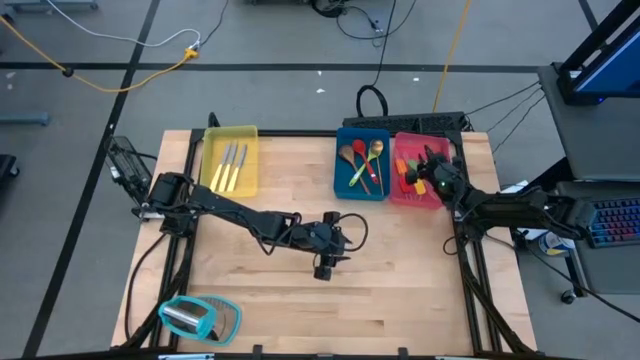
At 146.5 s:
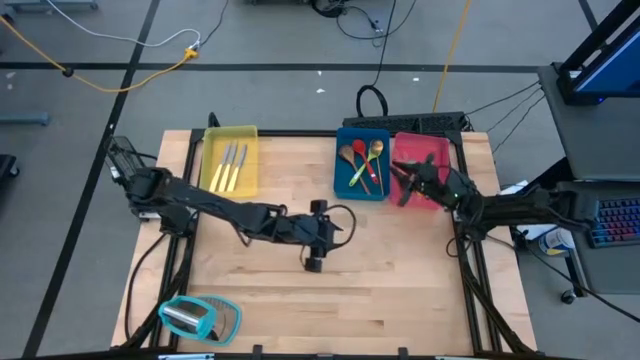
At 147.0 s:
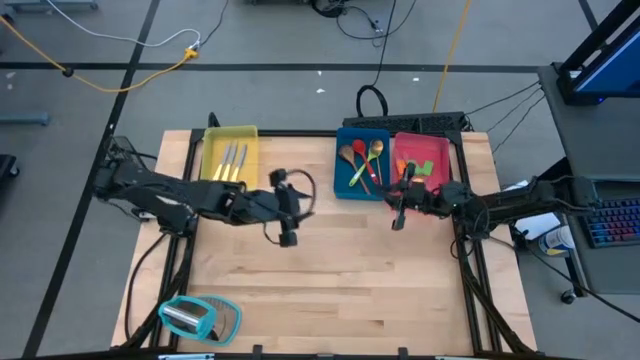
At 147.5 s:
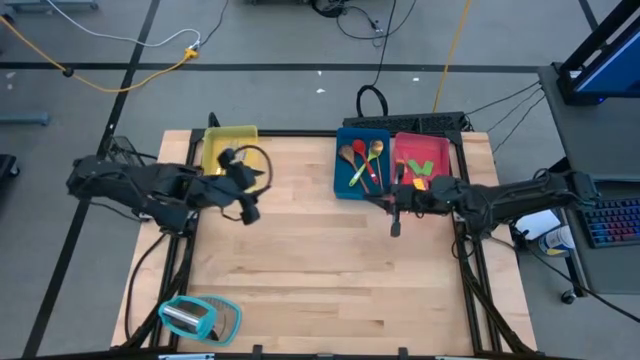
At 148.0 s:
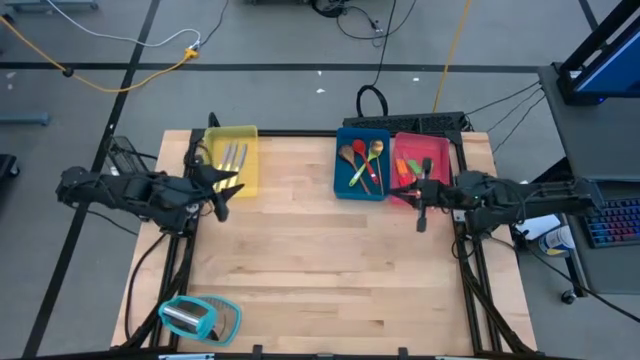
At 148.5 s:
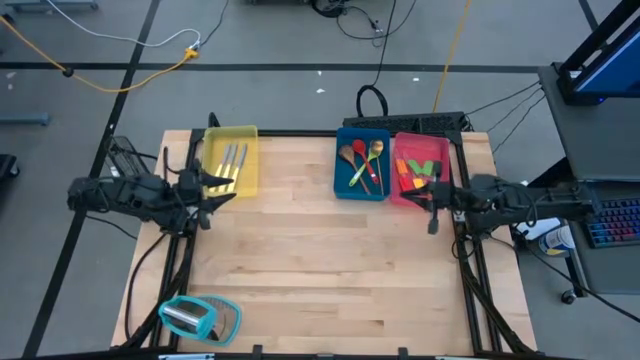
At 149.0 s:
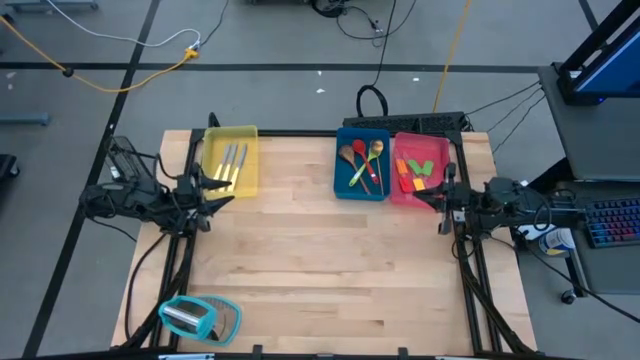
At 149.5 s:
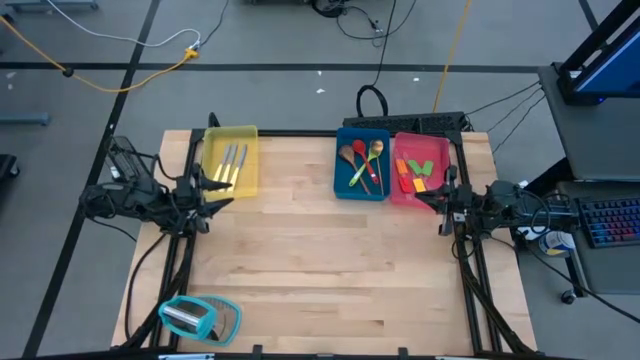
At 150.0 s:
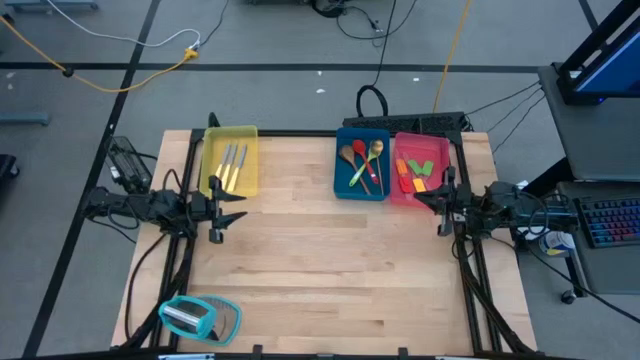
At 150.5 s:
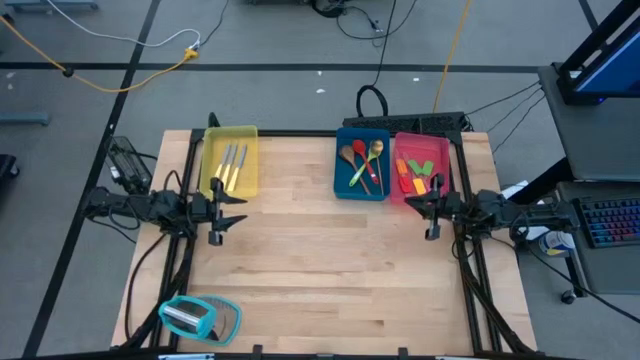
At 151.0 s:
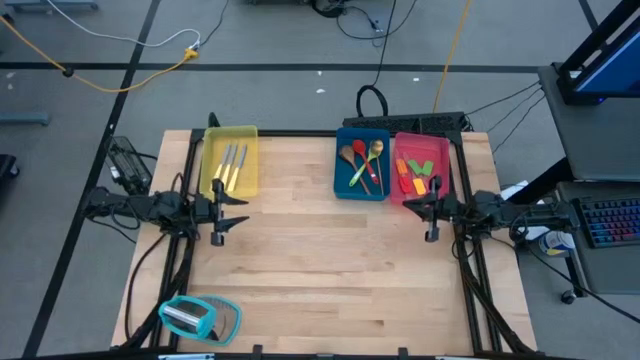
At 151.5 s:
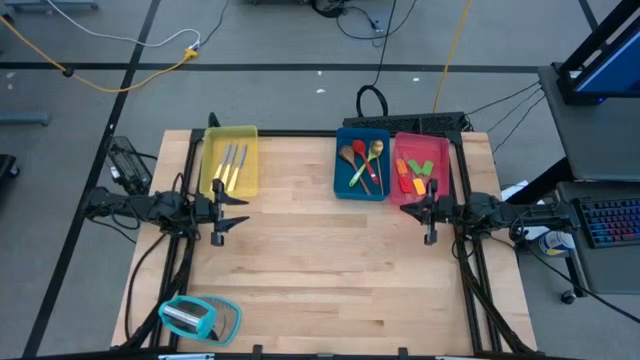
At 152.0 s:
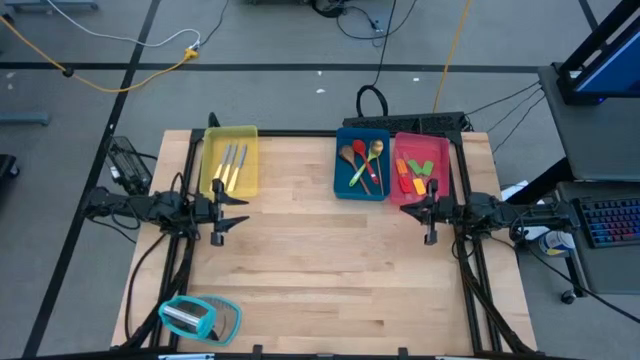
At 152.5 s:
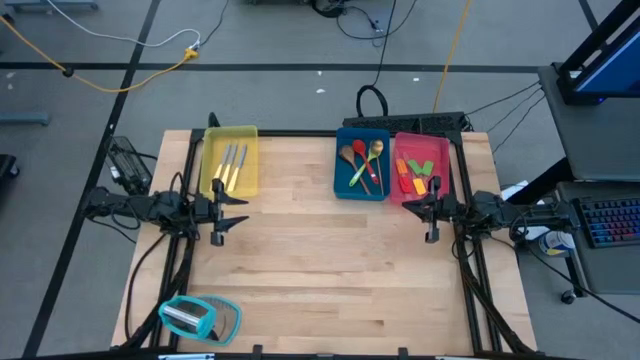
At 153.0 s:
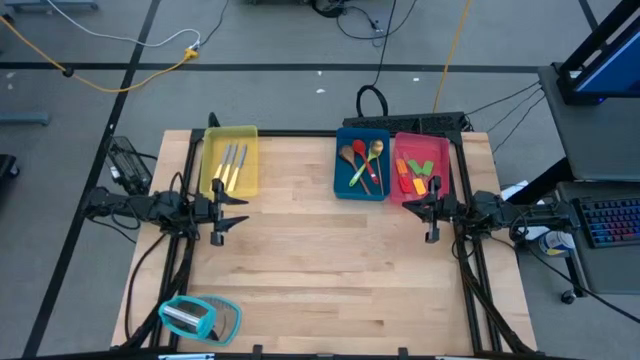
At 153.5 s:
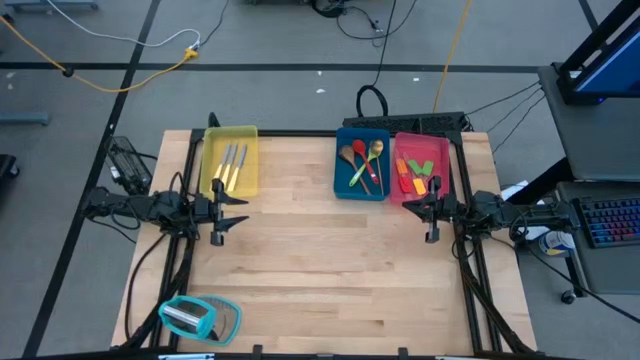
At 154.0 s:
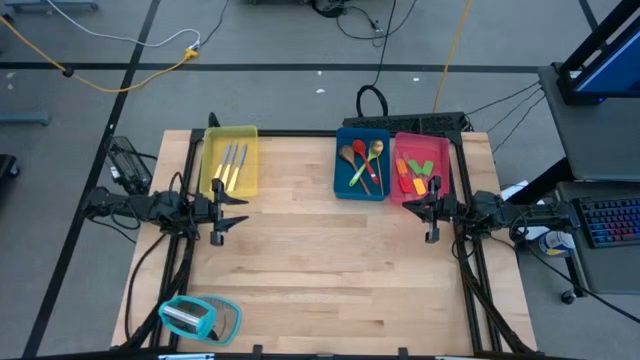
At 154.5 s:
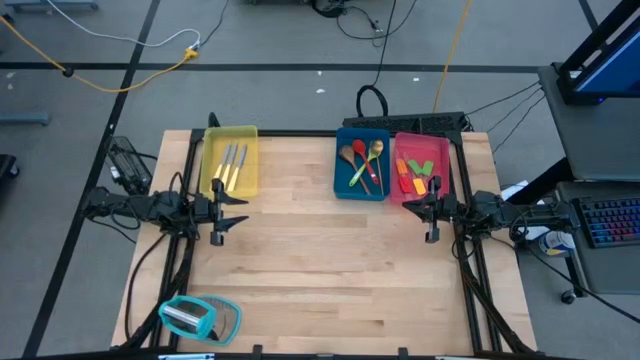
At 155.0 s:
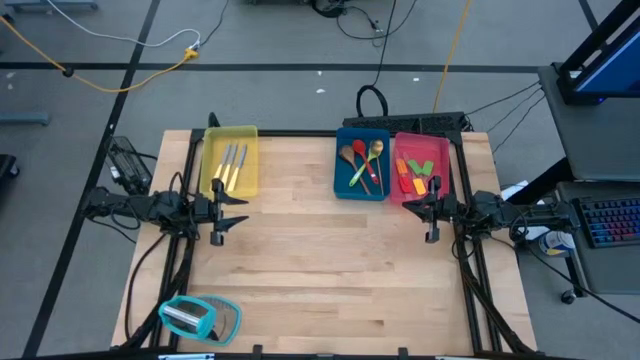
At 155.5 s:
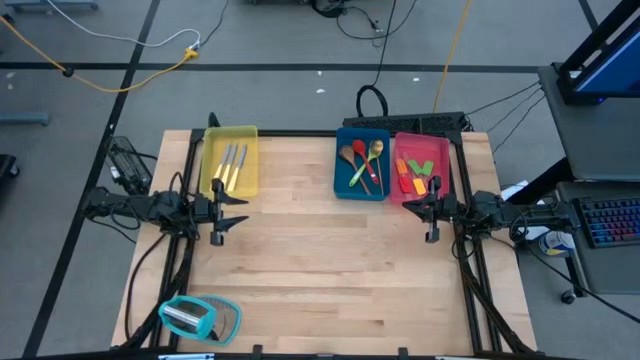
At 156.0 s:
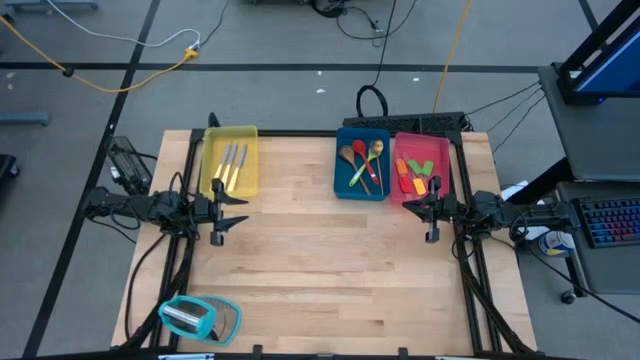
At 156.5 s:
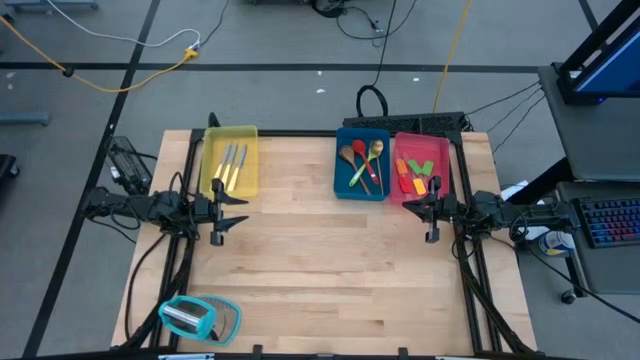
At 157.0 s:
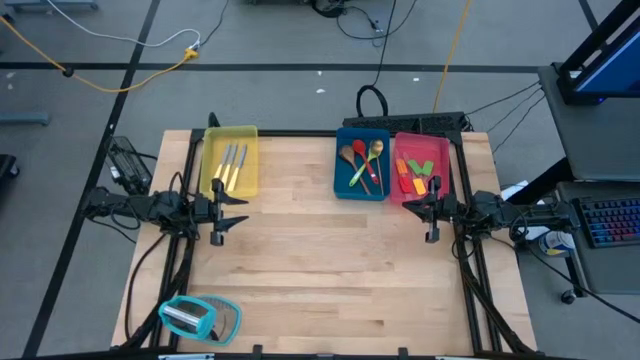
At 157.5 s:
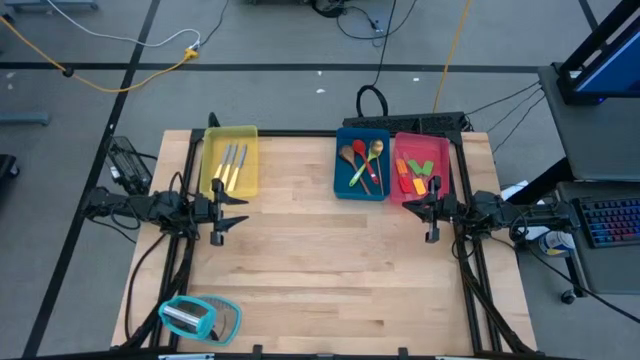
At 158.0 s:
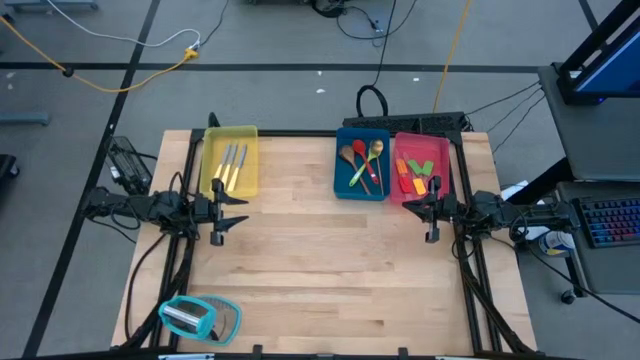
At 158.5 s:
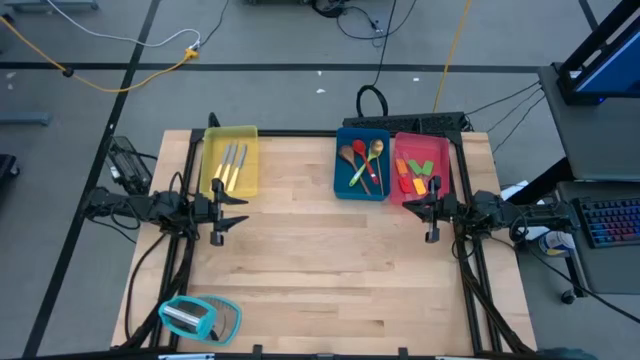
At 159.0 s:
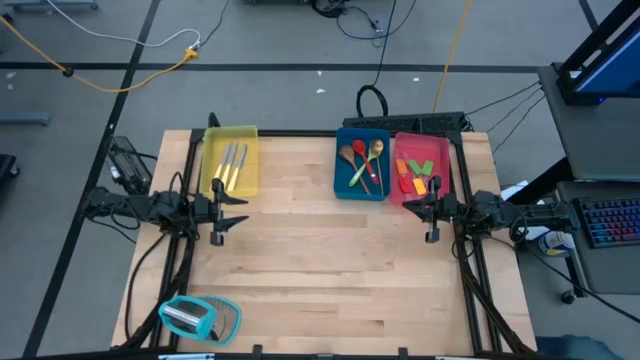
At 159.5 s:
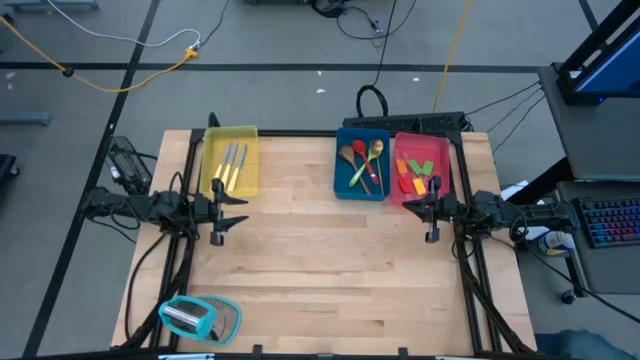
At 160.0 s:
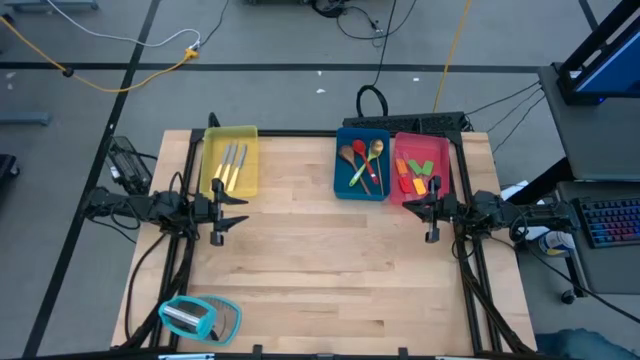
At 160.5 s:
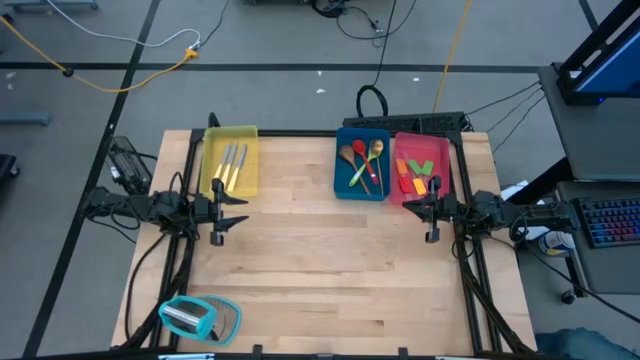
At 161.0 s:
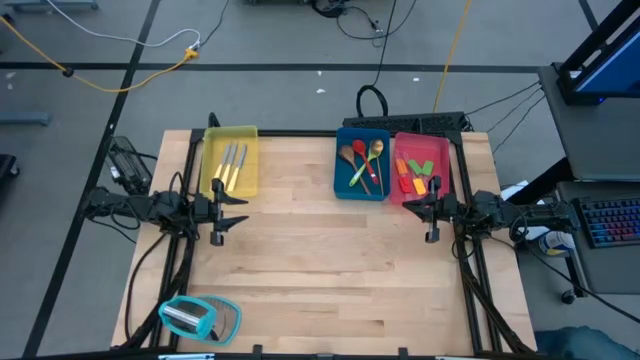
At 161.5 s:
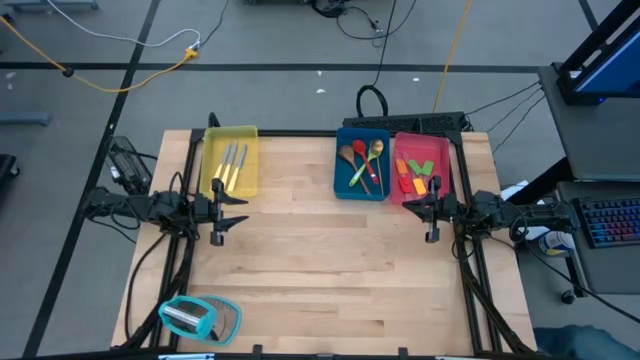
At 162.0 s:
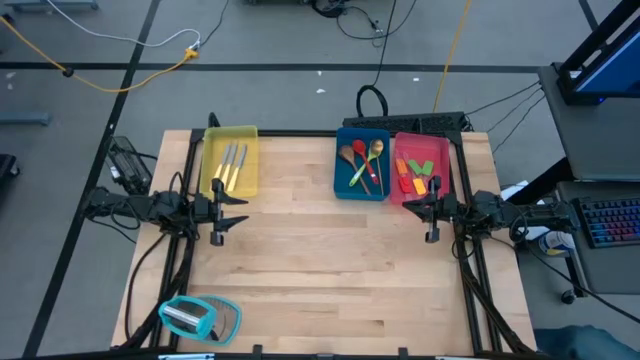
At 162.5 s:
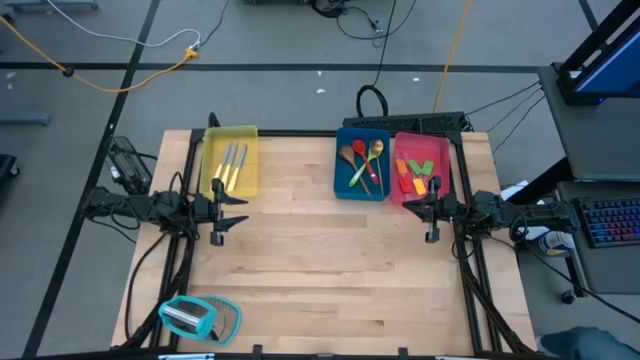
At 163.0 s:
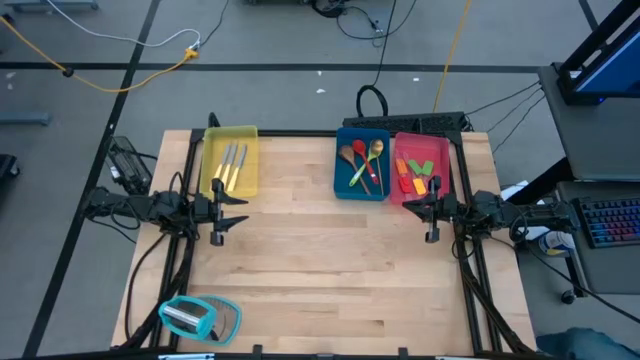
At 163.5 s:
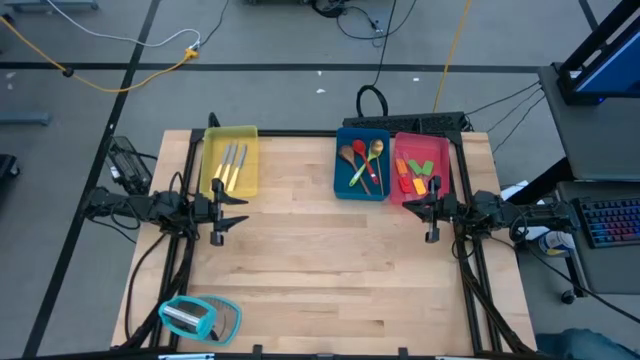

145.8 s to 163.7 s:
Task: Pick & Place Kitchen Items
Return to Home Position

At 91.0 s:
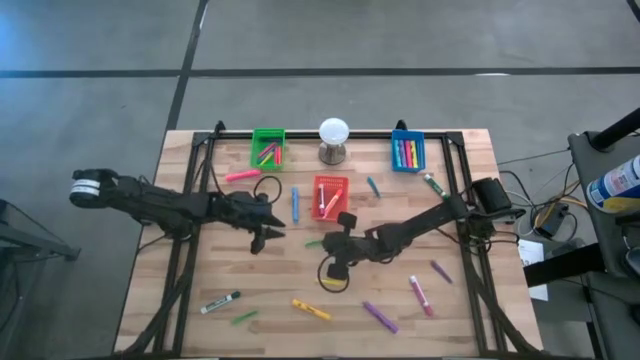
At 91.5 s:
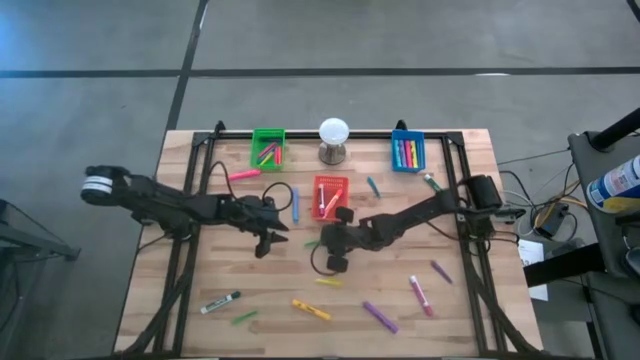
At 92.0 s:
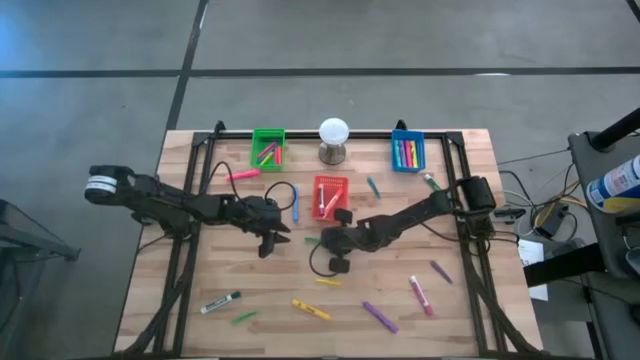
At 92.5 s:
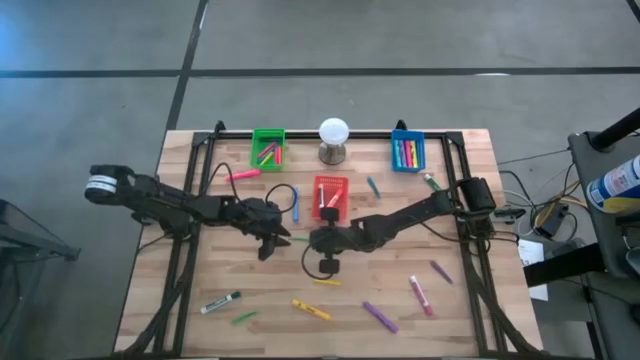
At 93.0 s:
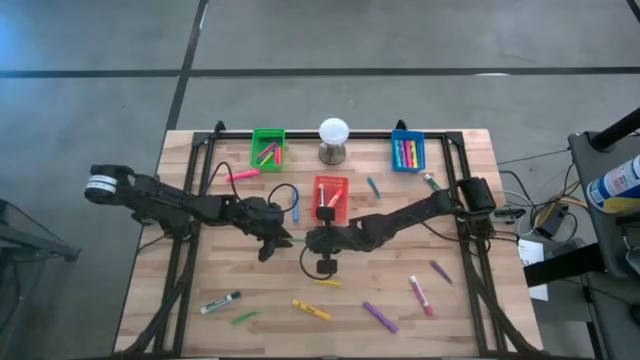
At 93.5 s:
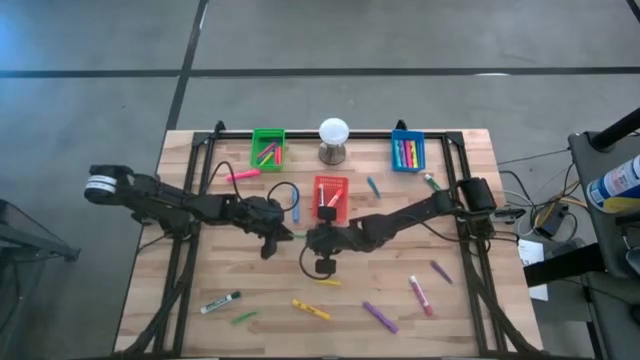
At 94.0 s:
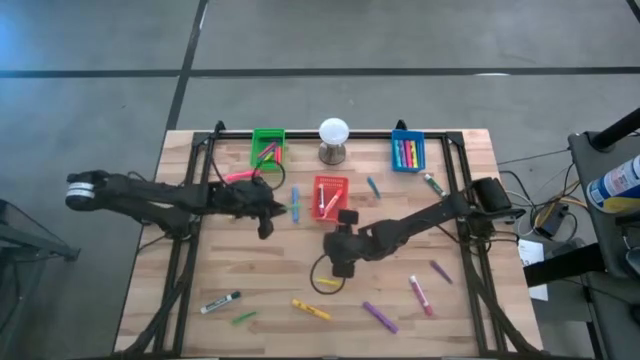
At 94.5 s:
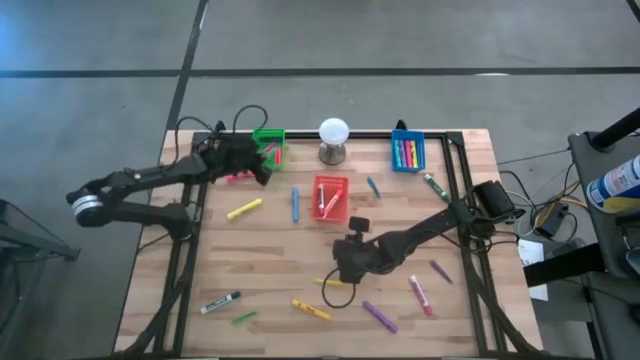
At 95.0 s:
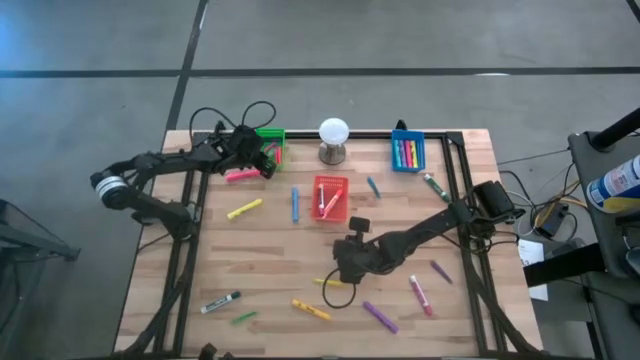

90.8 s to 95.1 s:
Task: Pick & Place Markers
Put the top green pen into the green bin
